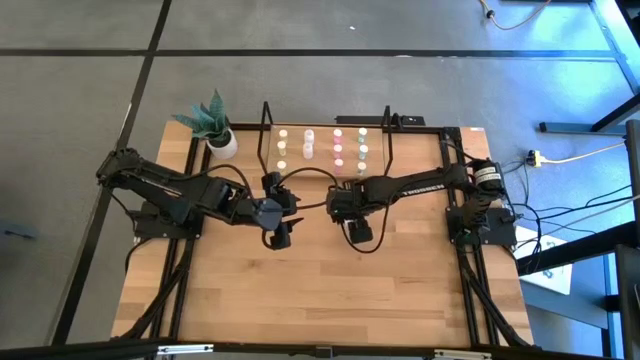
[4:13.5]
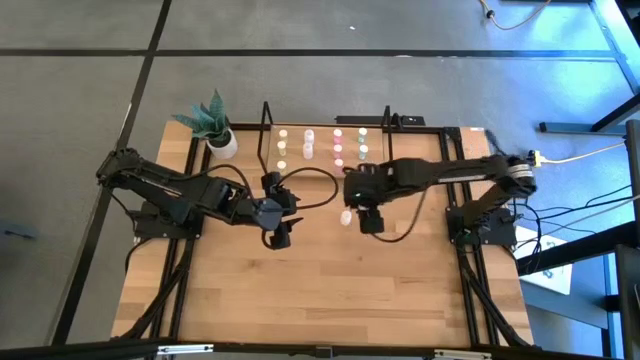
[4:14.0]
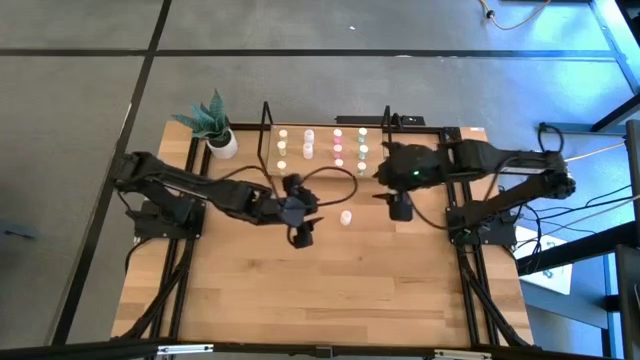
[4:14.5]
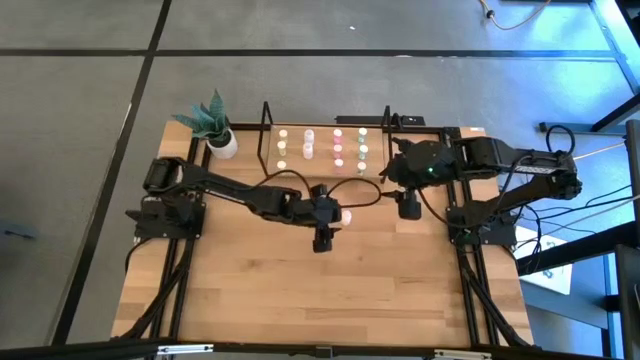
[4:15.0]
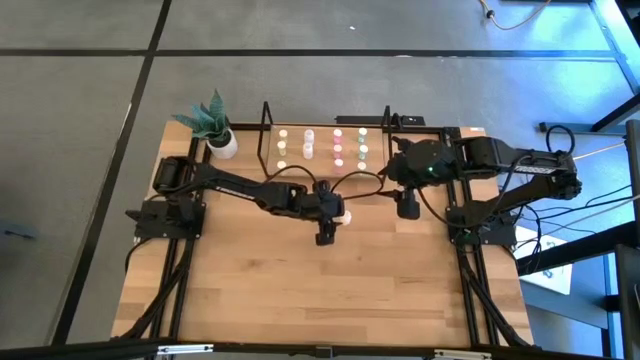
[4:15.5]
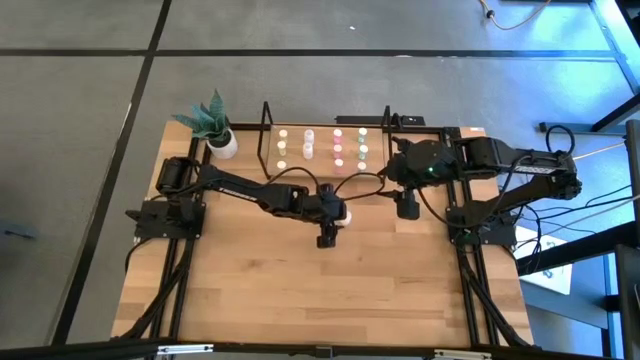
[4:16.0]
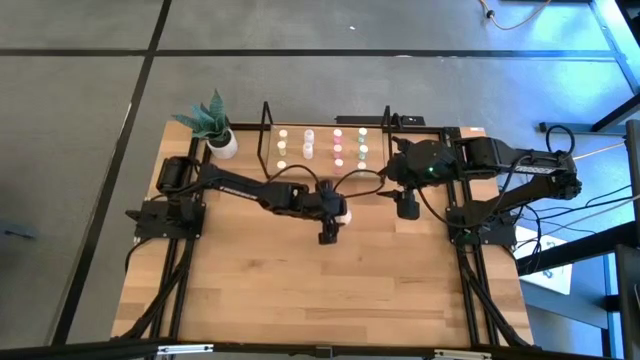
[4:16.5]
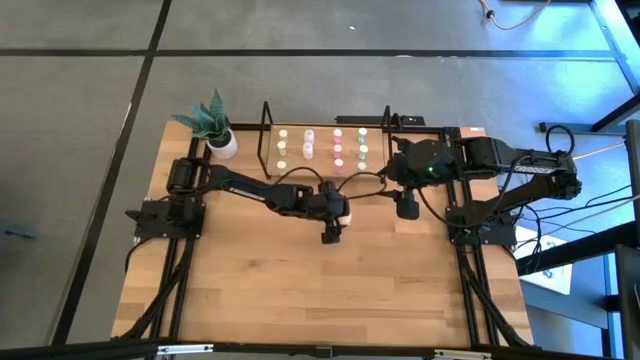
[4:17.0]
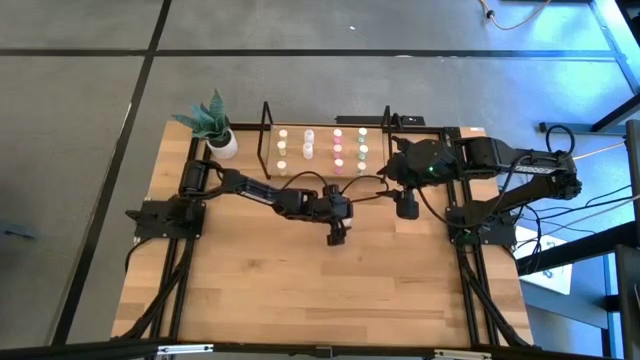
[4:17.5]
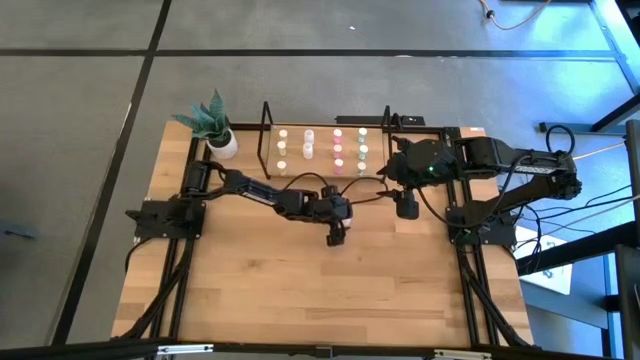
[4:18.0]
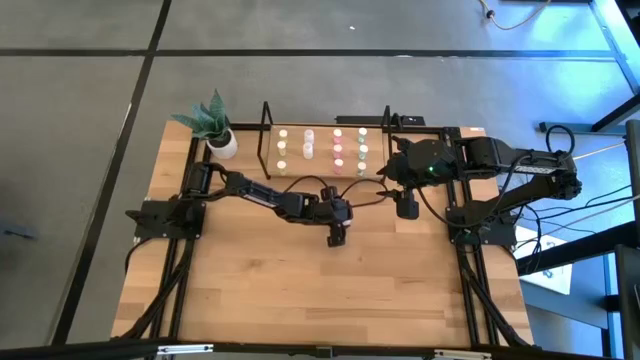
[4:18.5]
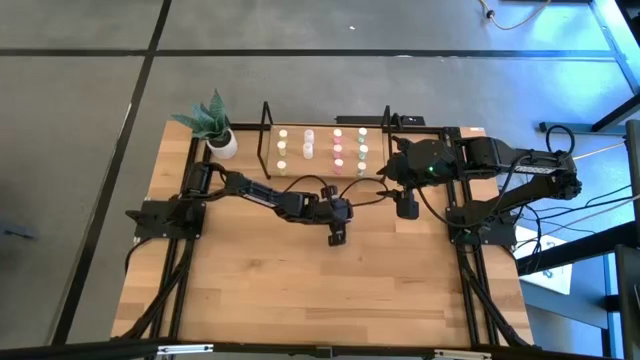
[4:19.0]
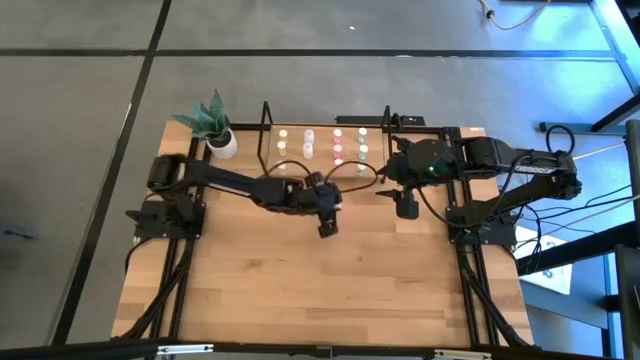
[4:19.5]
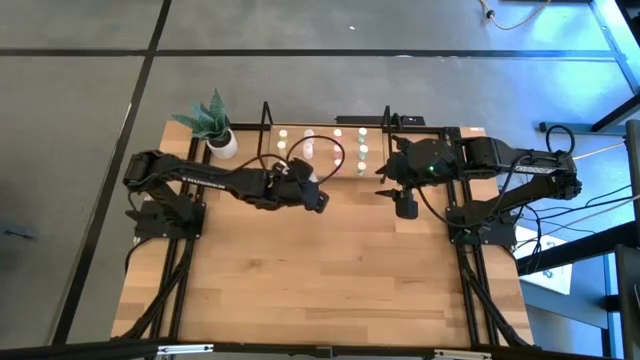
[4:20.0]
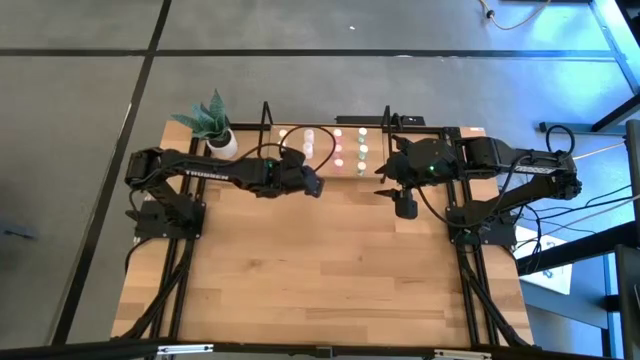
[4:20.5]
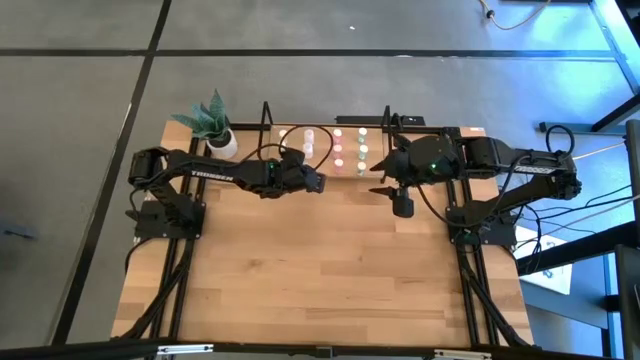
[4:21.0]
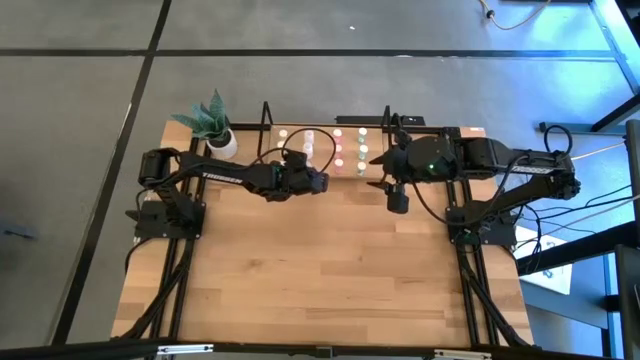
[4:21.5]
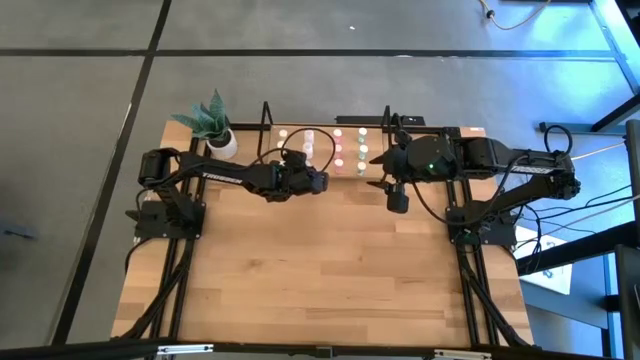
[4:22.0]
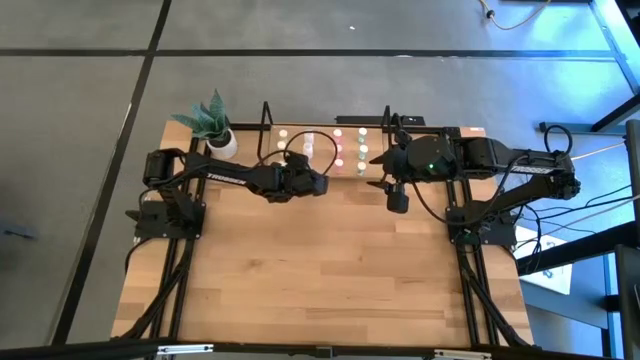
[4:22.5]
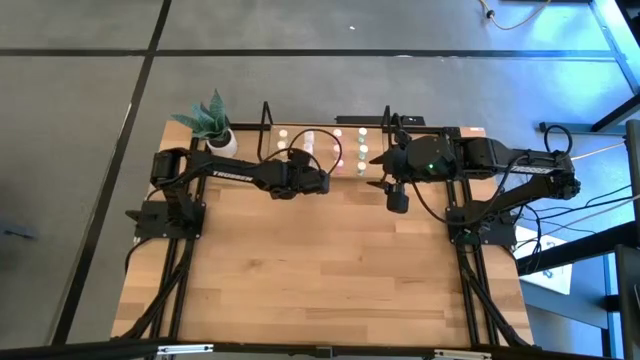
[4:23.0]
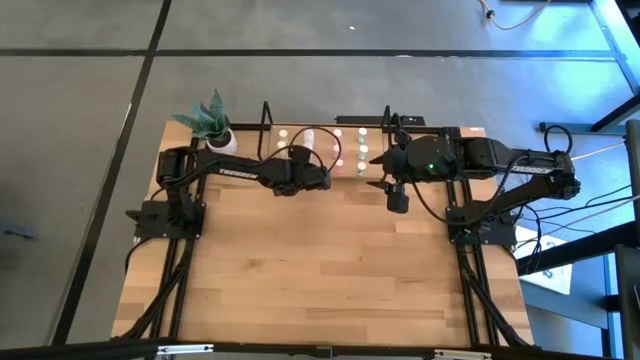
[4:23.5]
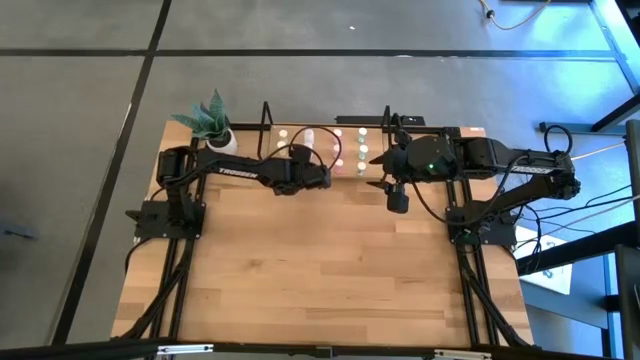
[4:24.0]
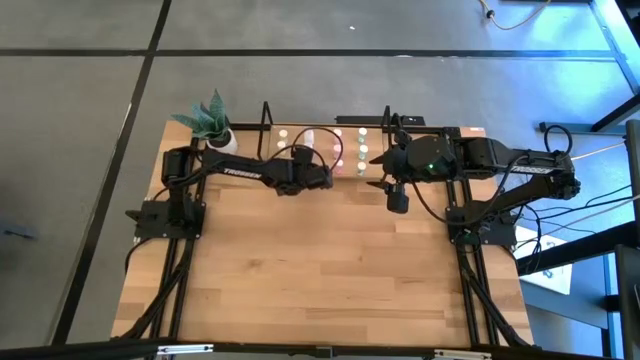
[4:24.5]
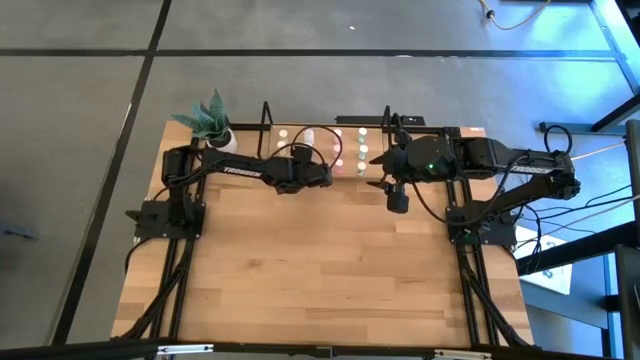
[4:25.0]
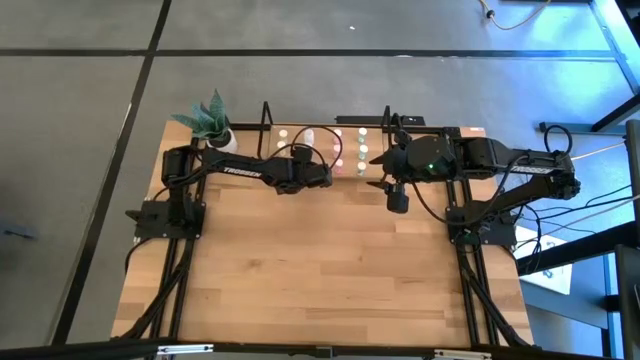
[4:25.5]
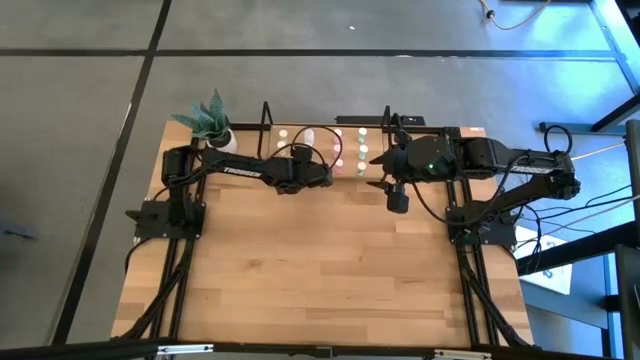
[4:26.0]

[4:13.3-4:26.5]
Task: Pick and place medicine bottles onto shelf by color
Put the white bottle on the shelf aligned with other white pill bottles

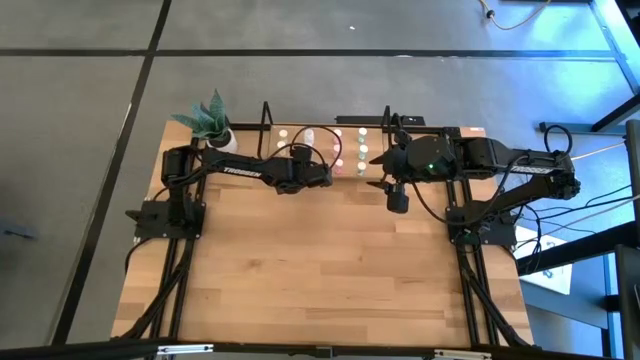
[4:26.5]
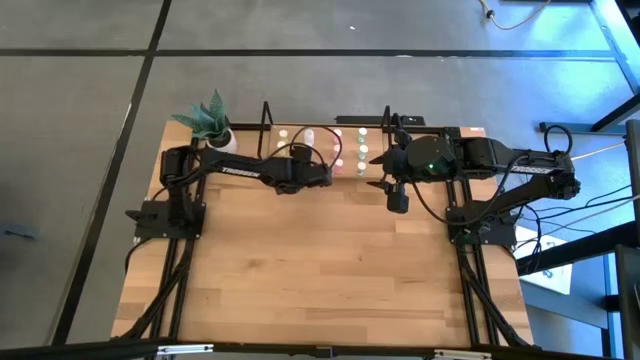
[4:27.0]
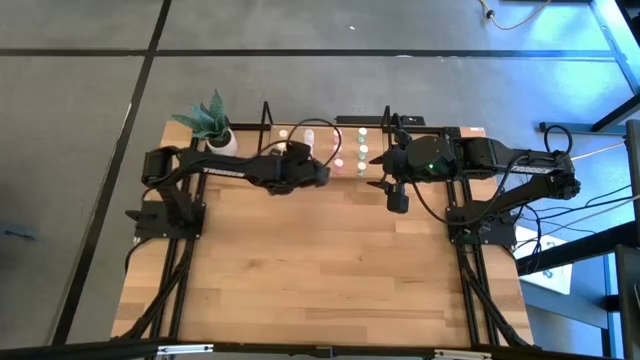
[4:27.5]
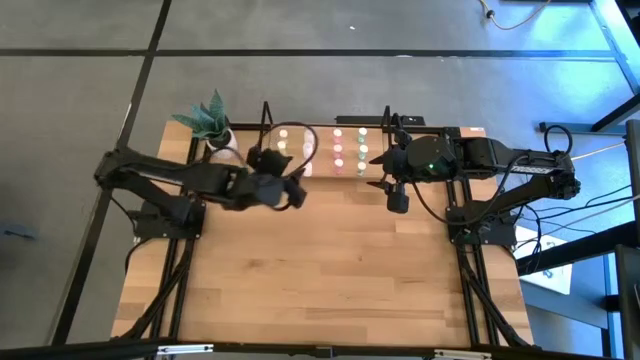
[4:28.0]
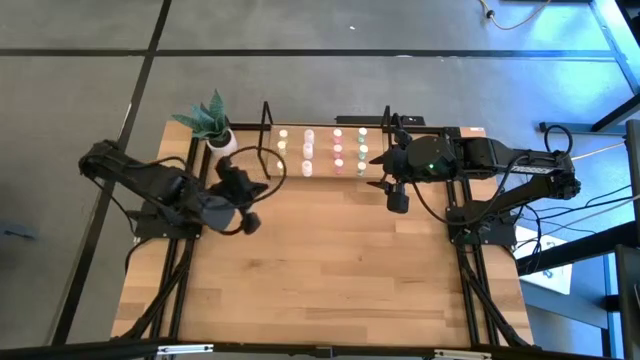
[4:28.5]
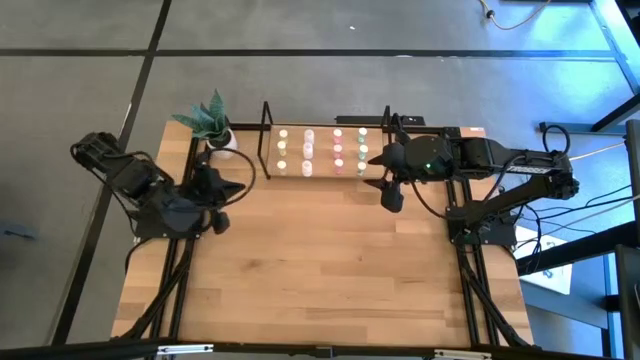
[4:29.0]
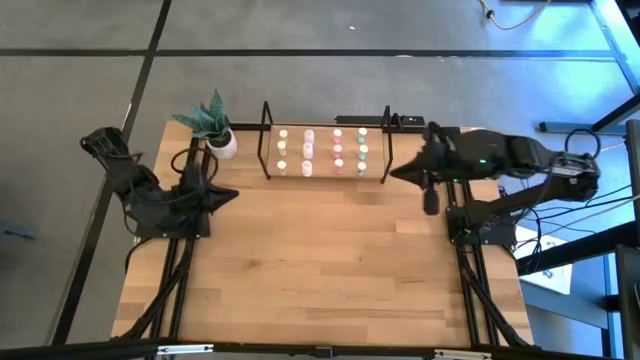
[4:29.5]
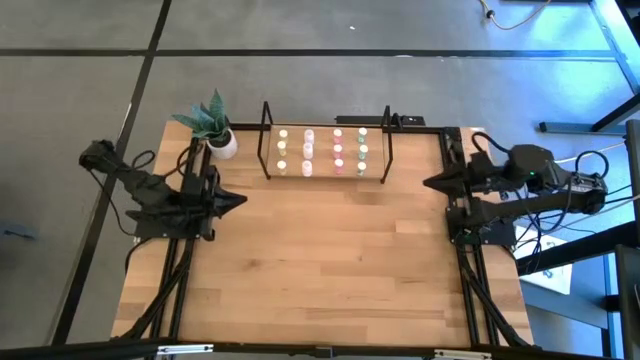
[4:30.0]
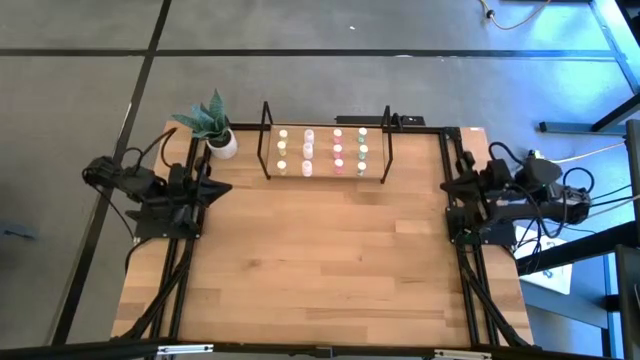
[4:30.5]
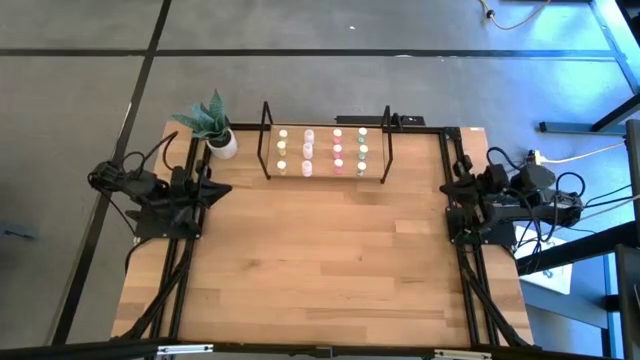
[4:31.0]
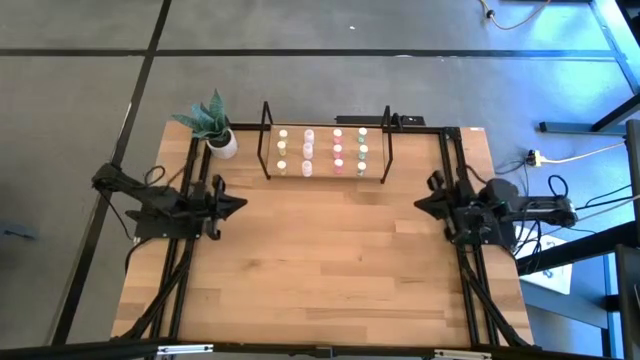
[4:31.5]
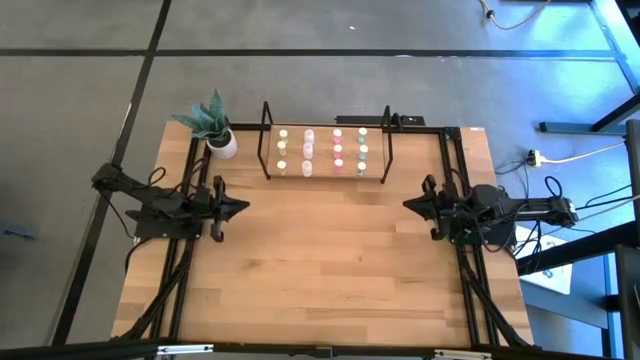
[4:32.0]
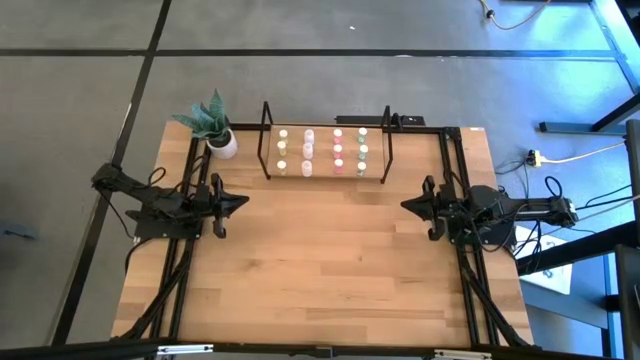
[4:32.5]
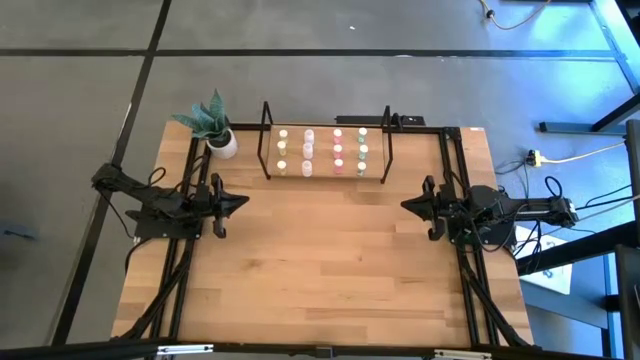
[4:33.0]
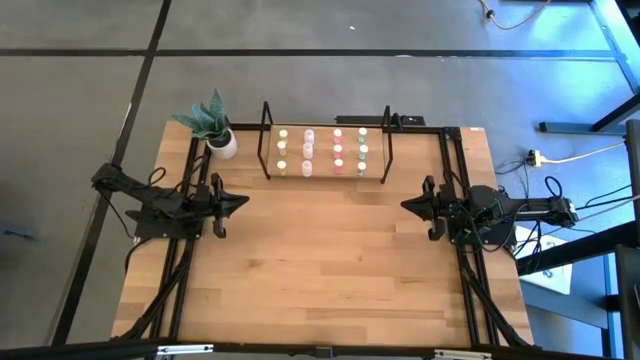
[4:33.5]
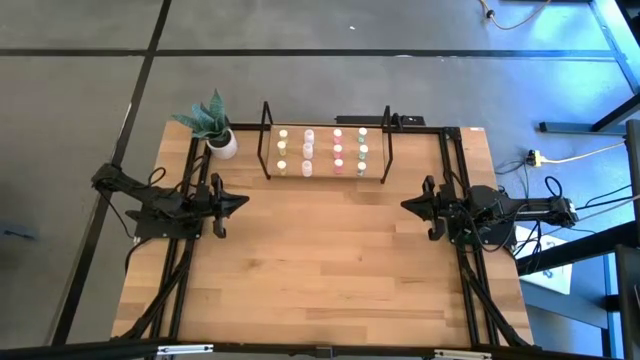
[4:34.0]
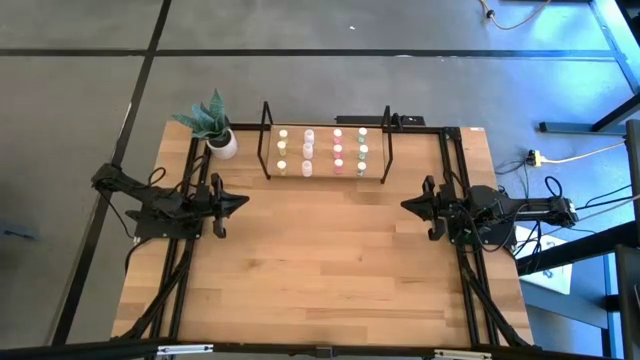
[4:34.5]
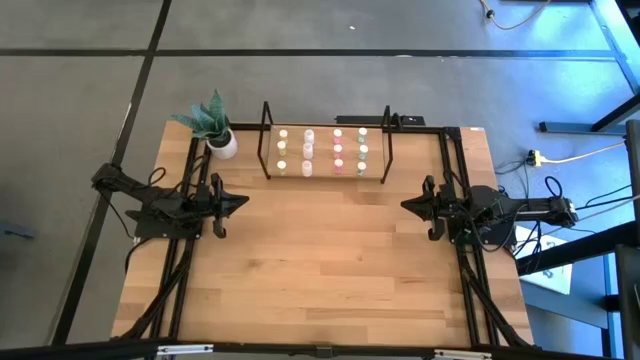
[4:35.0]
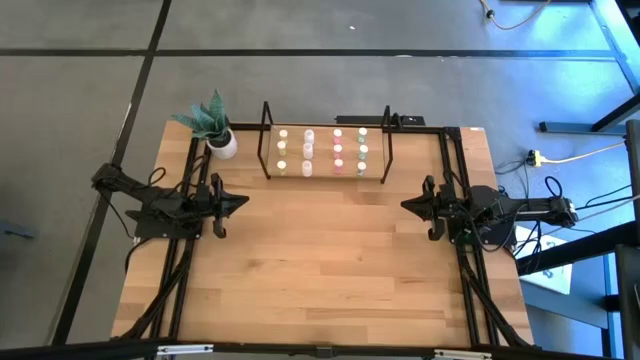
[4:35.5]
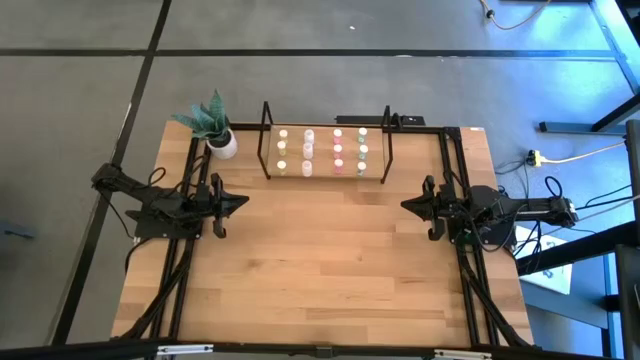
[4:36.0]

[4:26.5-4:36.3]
Return to Home Position
